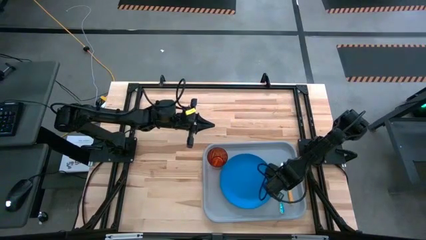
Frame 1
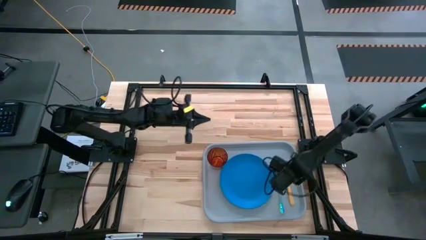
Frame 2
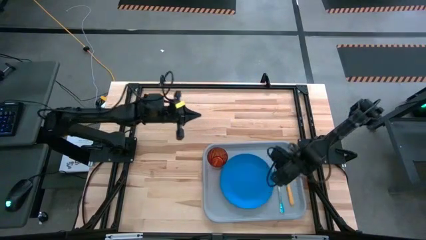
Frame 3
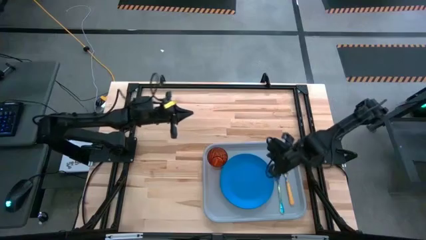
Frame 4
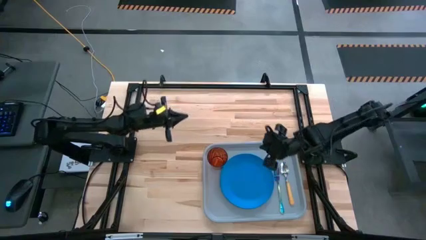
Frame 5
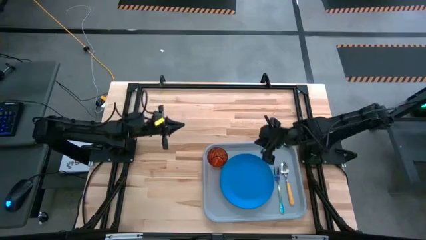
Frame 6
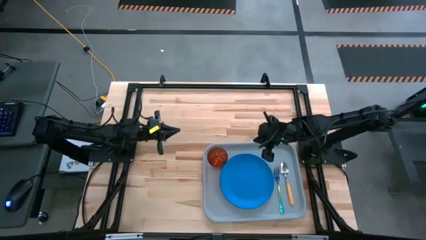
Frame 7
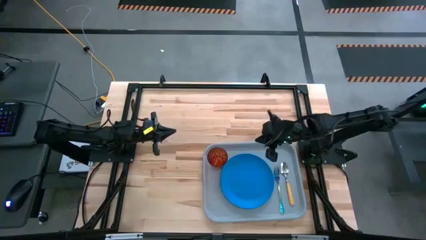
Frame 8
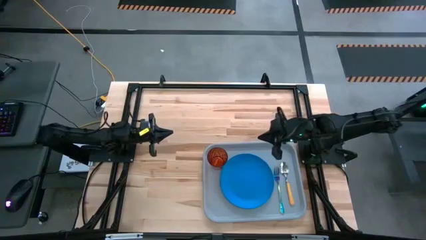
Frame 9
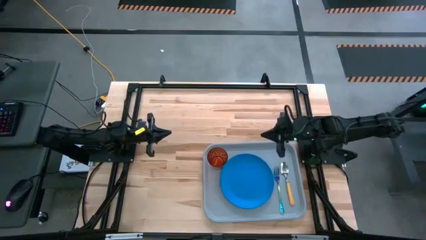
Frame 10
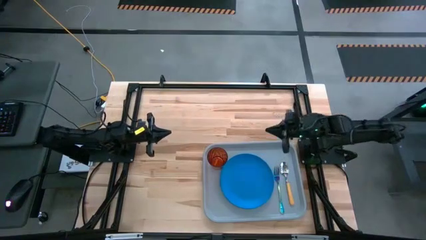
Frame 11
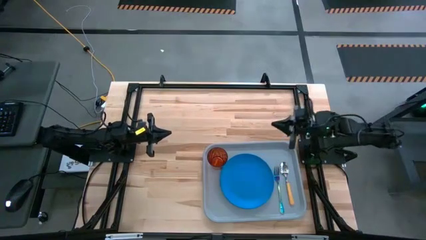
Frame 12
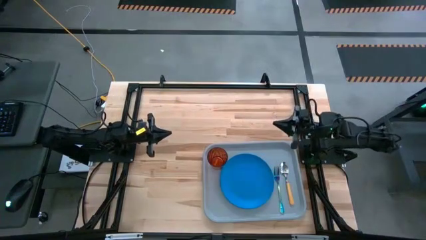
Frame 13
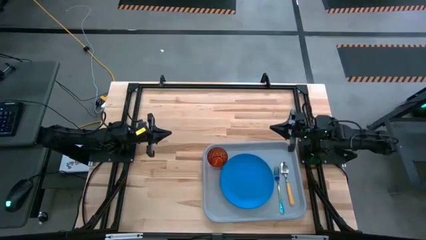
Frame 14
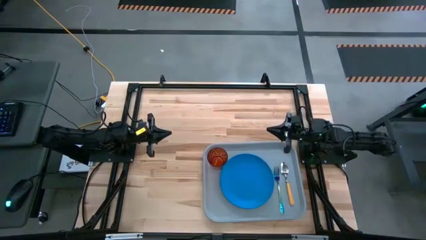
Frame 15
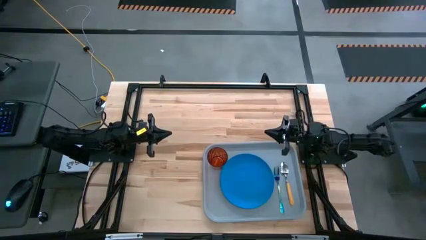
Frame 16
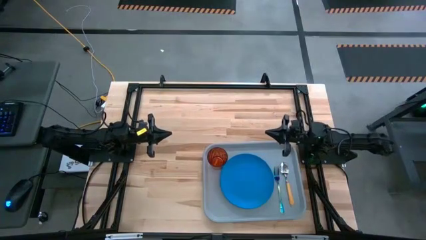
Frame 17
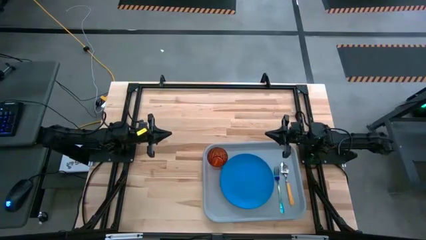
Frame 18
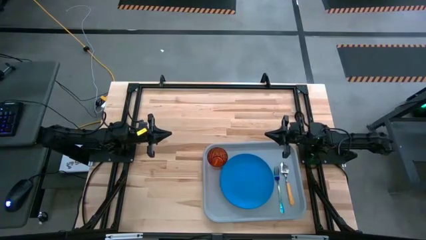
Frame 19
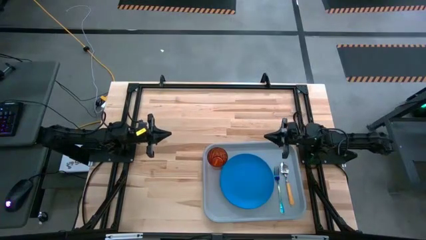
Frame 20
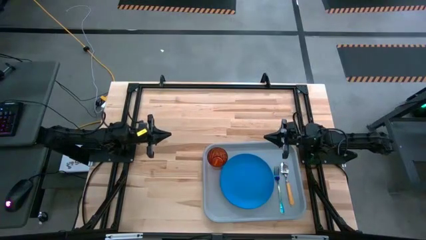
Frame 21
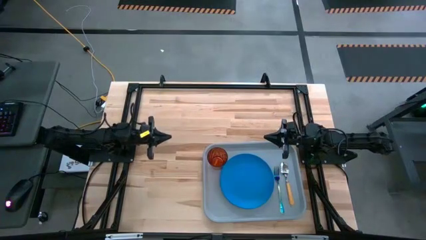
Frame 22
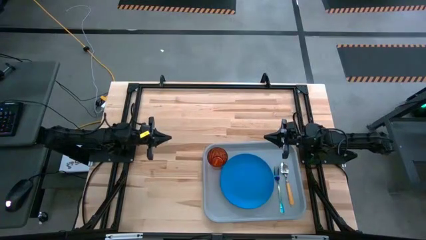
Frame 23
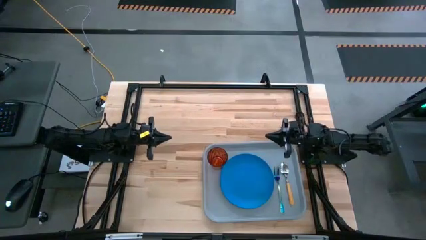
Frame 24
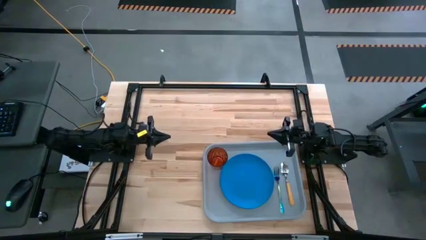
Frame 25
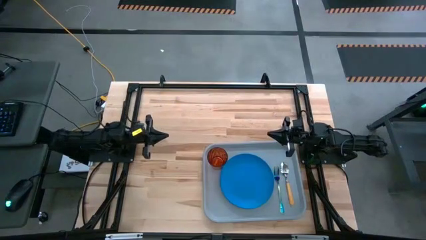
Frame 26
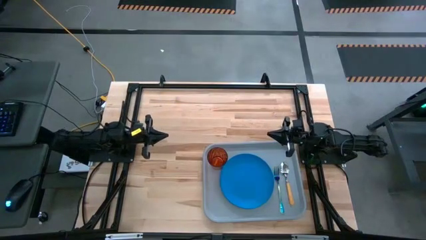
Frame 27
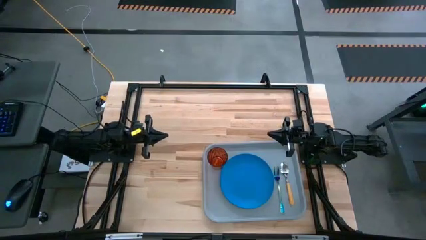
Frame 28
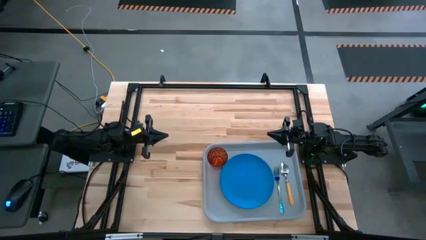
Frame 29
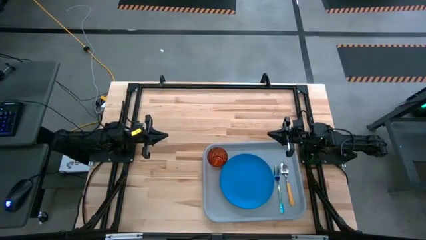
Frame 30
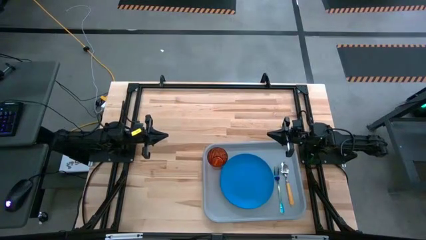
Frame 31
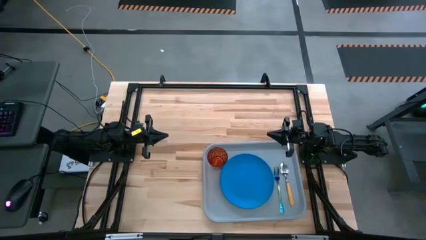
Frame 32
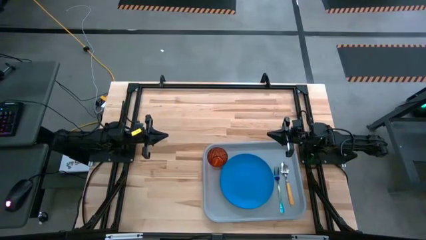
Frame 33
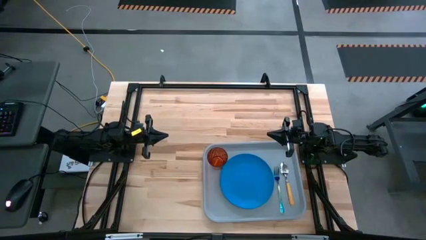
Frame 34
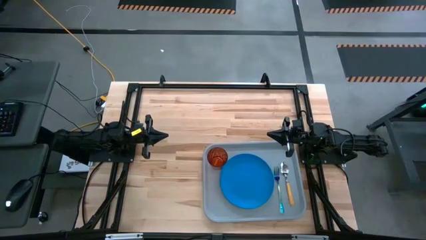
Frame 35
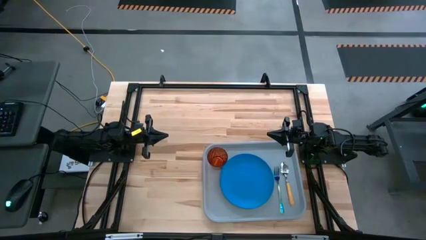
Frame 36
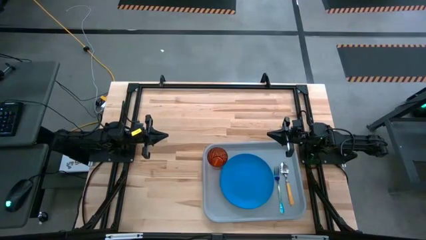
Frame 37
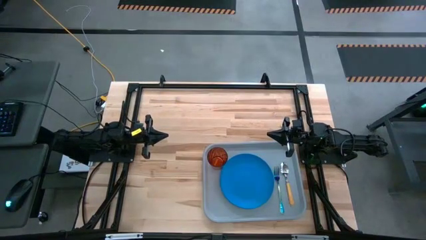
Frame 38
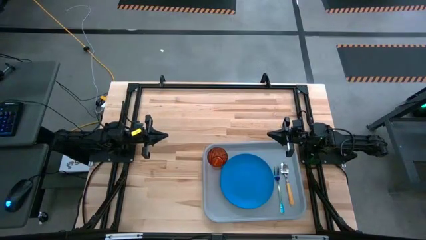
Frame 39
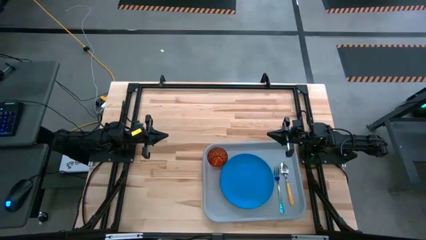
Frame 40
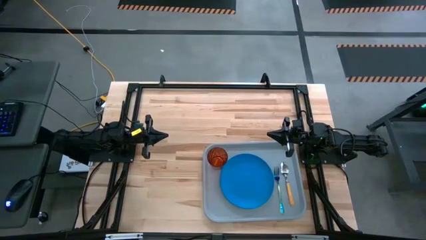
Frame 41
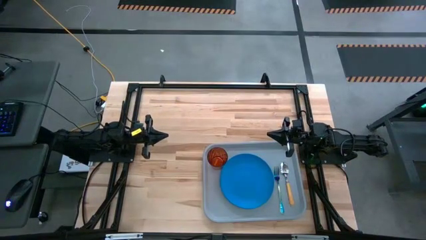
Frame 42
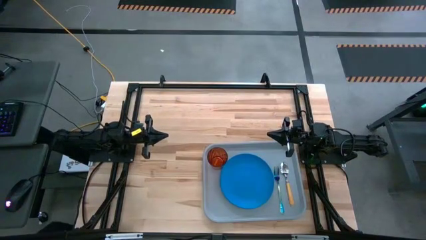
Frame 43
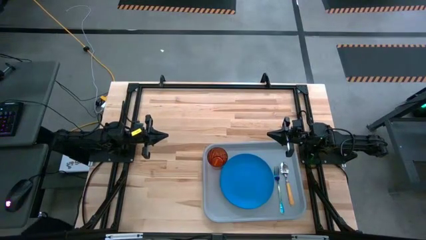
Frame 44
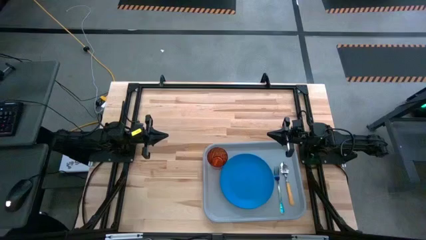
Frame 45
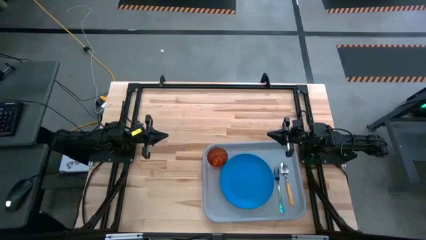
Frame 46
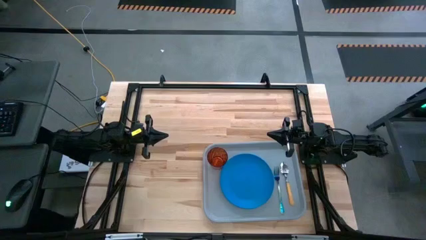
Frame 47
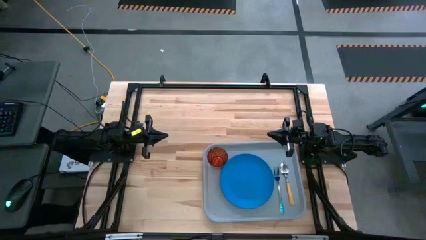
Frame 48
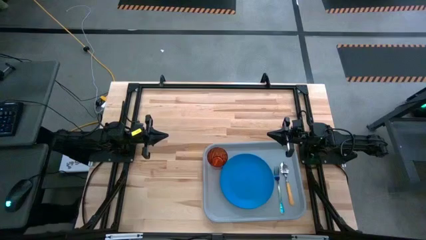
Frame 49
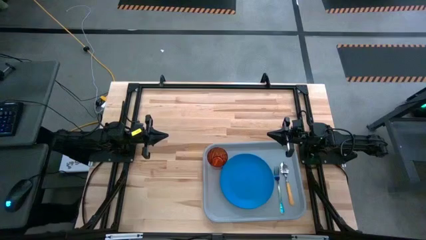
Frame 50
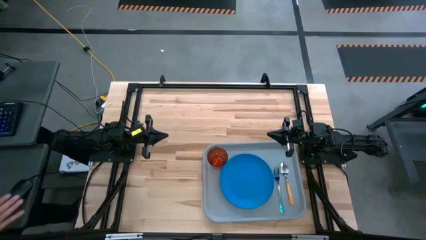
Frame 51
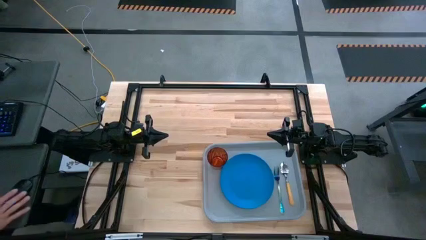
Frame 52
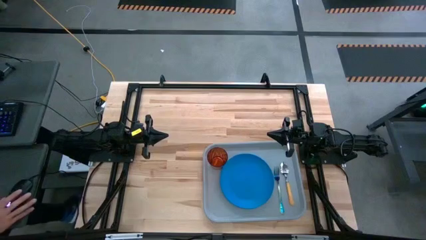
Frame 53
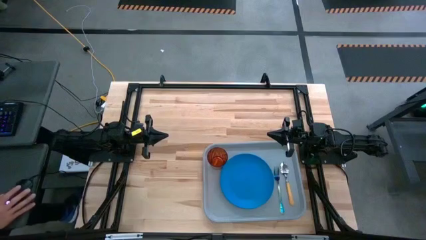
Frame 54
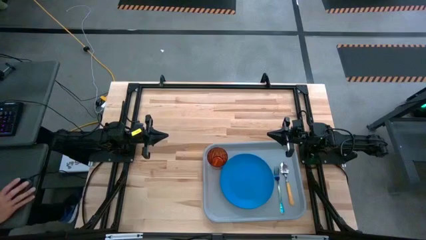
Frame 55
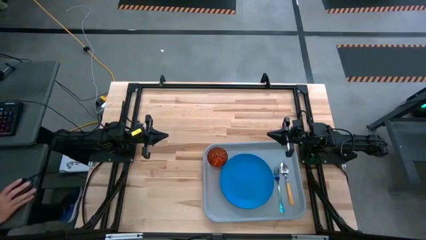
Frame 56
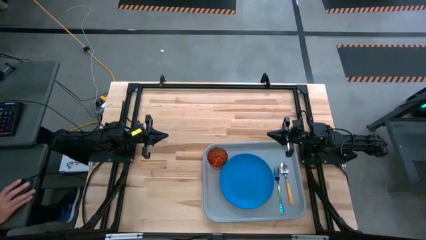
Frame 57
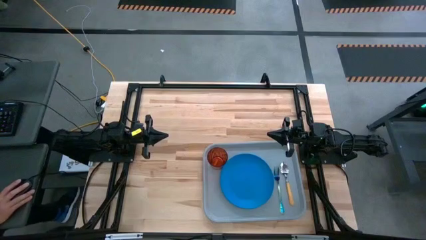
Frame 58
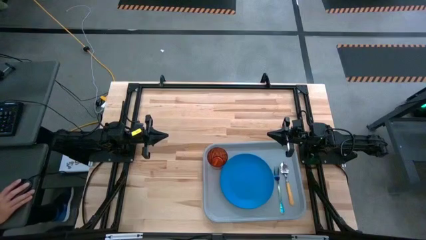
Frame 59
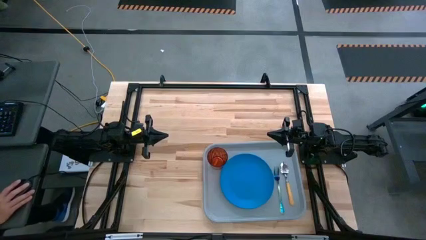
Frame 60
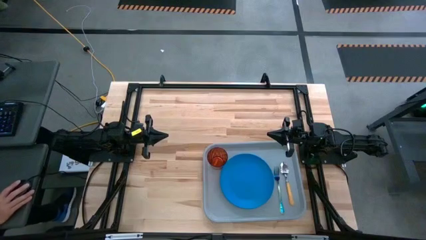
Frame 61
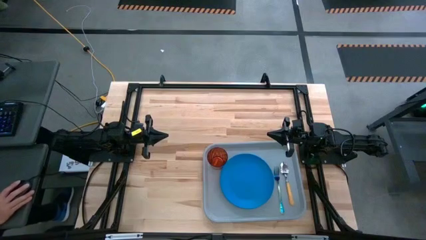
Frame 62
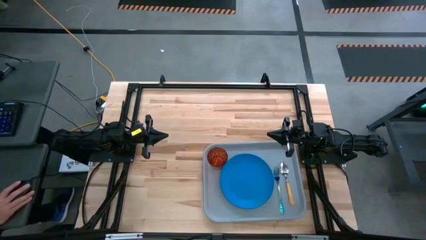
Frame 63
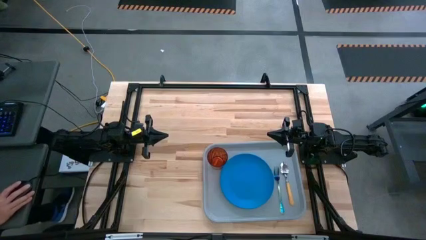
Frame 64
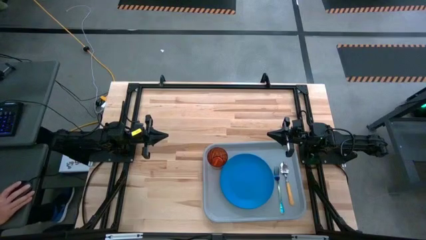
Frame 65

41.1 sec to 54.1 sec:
Task: Pick and place plate/cup/fork/spoon on tray
Return to Home Position

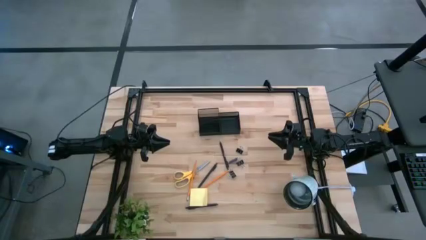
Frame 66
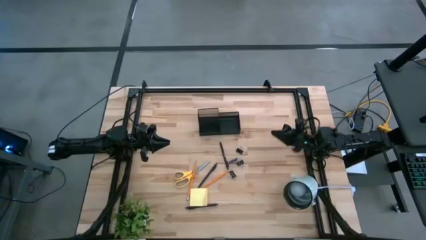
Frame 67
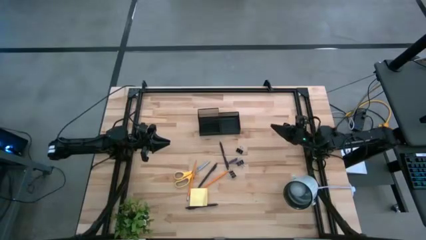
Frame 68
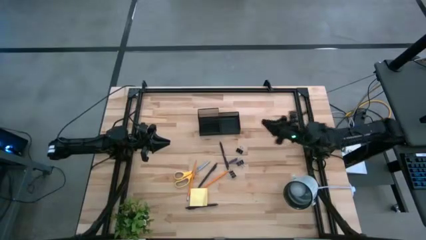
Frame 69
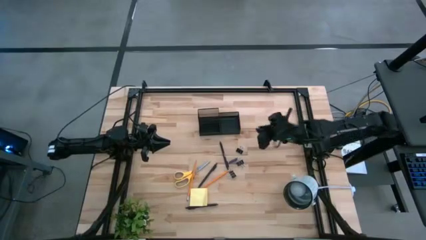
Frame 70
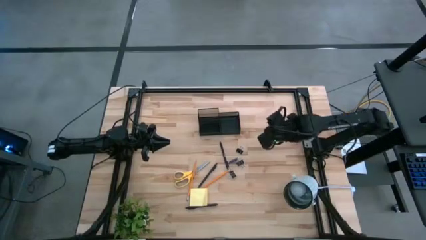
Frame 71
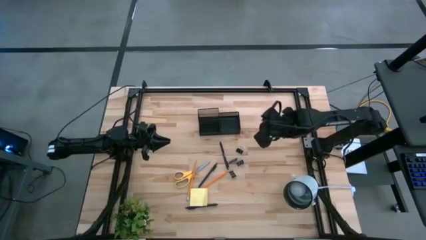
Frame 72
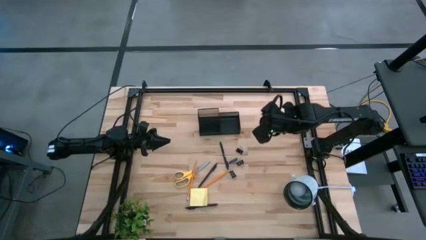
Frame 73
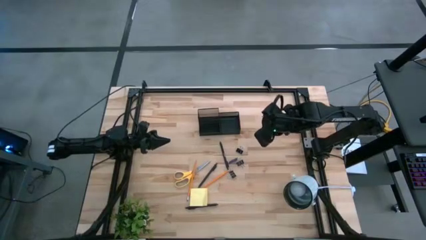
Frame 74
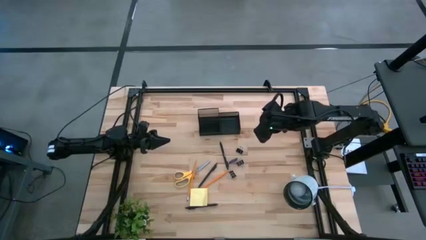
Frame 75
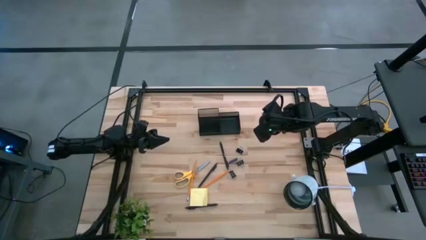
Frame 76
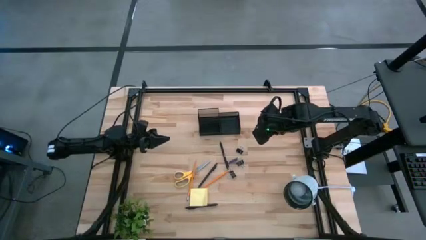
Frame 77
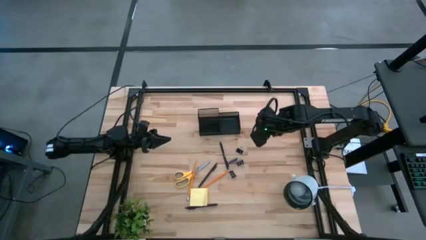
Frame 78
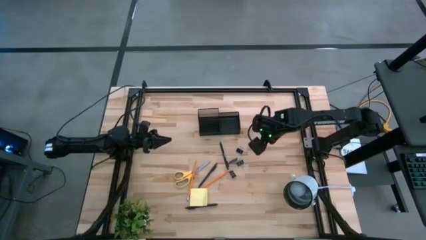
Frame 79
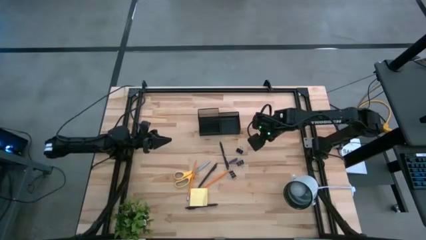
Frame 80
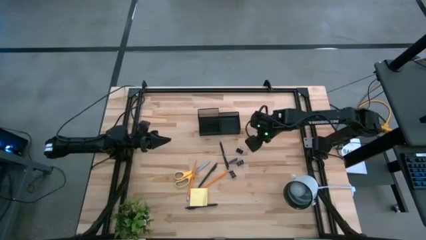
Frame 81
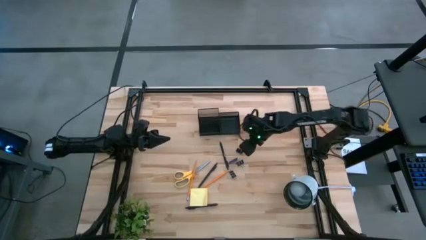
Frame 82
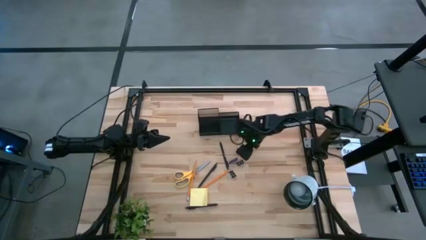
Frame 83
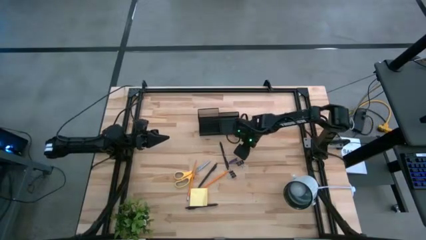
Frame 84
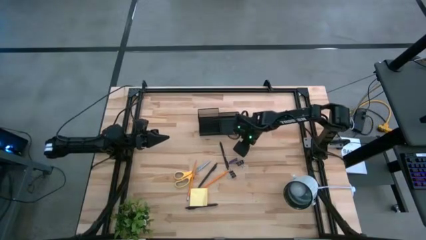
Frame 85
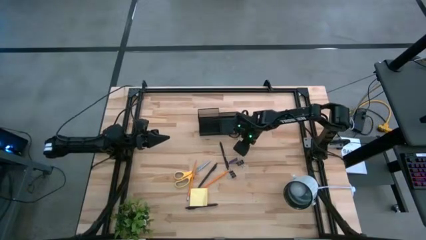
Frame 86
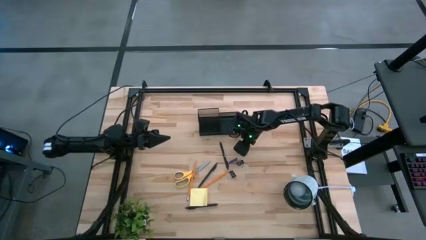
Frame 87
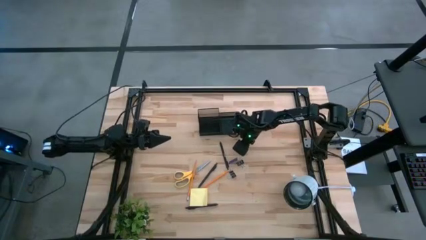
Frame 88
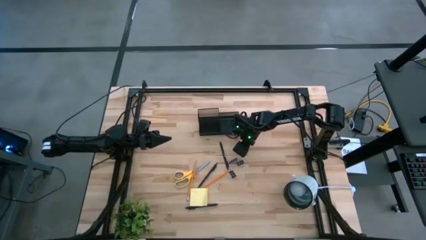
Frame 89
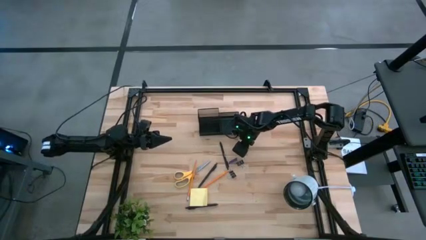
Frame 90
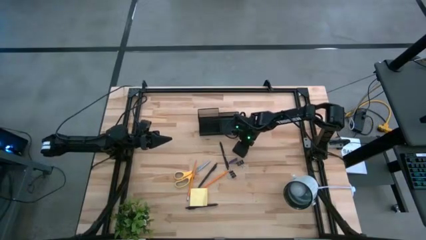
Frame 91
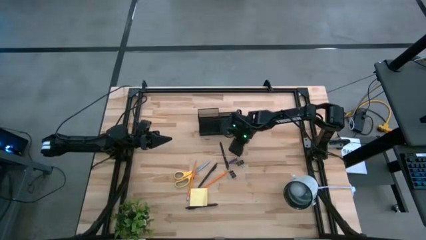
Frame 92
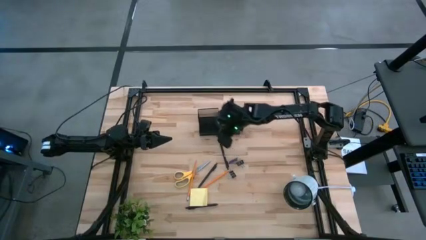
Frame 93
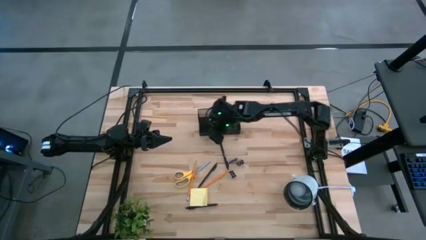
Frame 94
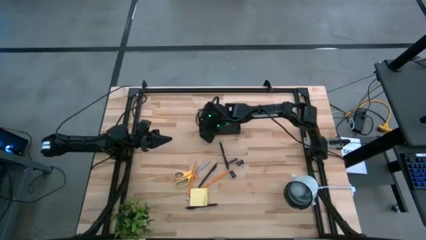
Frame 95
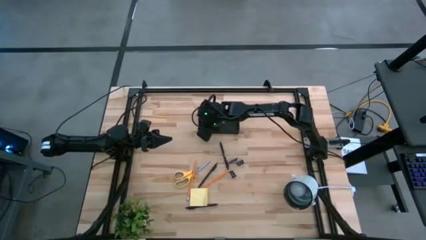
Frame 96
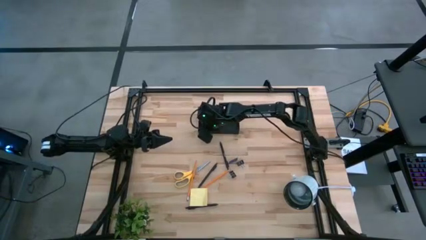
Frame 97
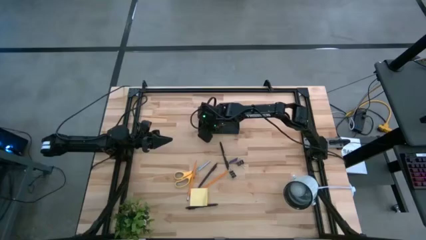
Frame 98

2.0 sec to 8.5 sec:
Task: Pick and place office supplies into organizer
Put the top black binder clip into the desk organizer
